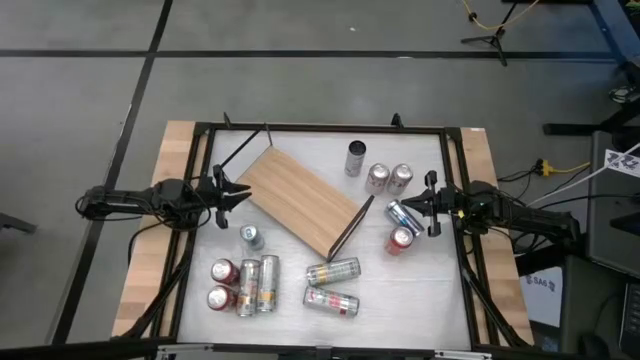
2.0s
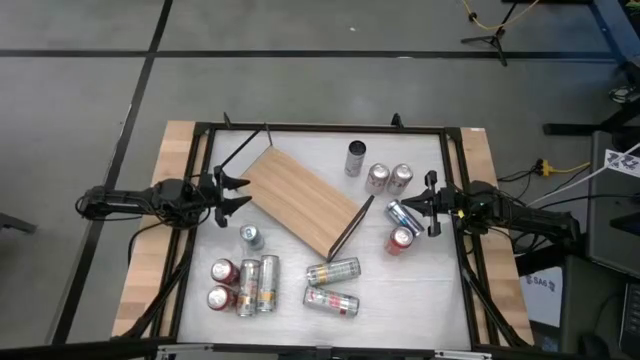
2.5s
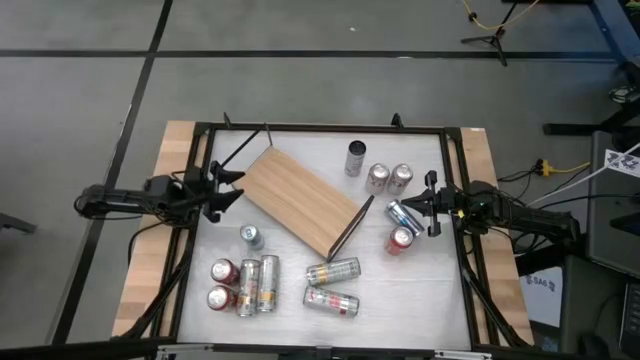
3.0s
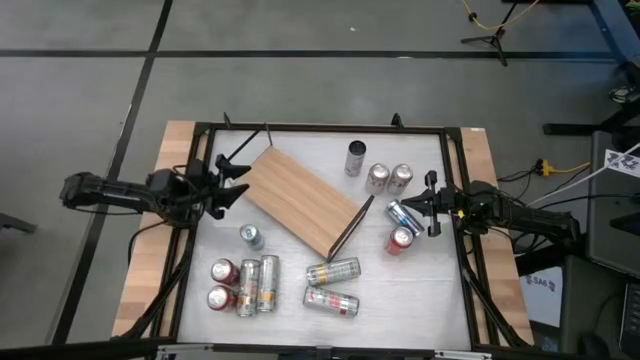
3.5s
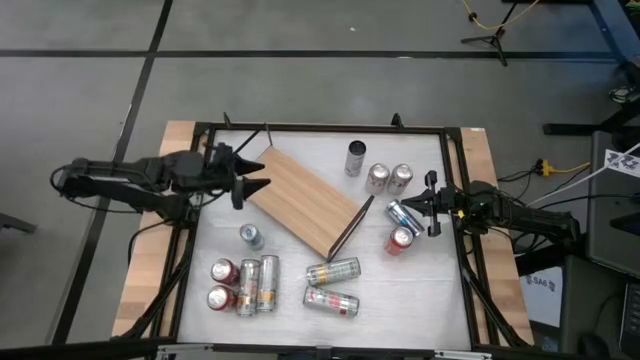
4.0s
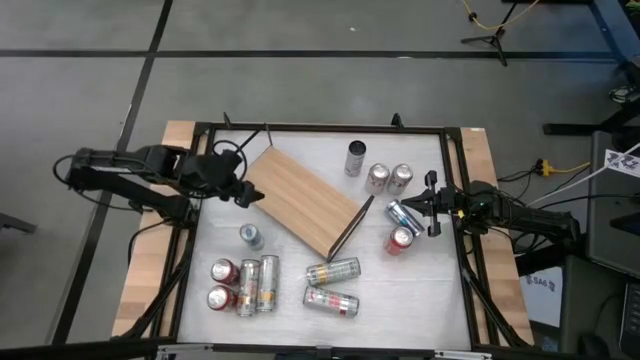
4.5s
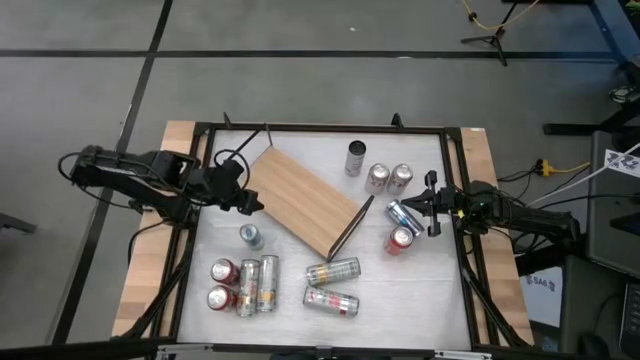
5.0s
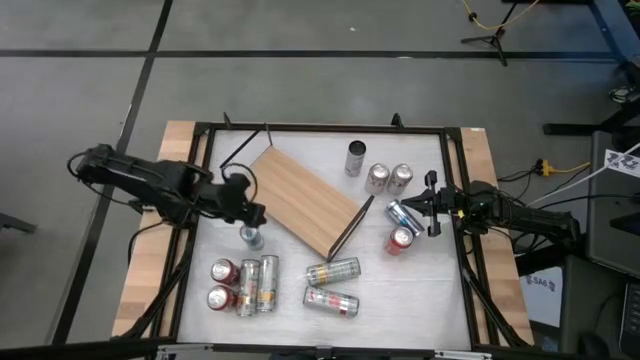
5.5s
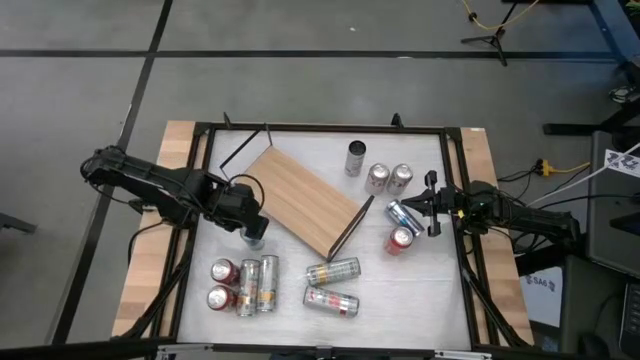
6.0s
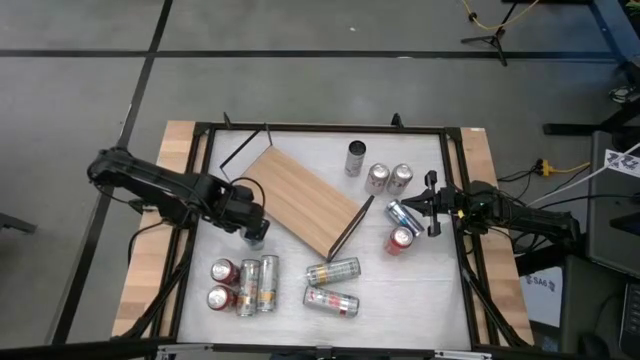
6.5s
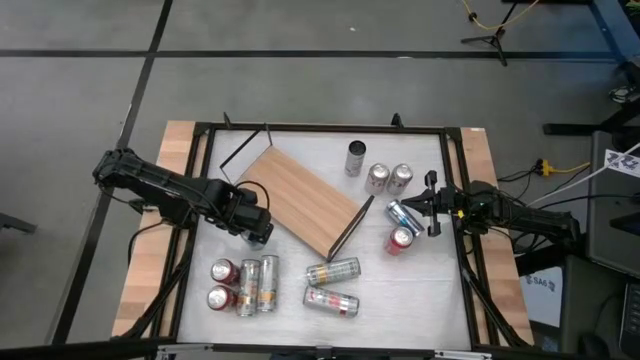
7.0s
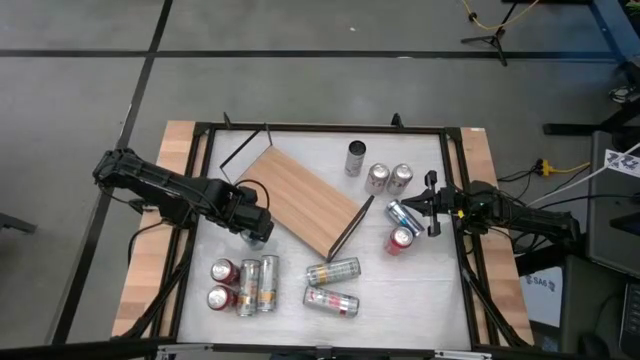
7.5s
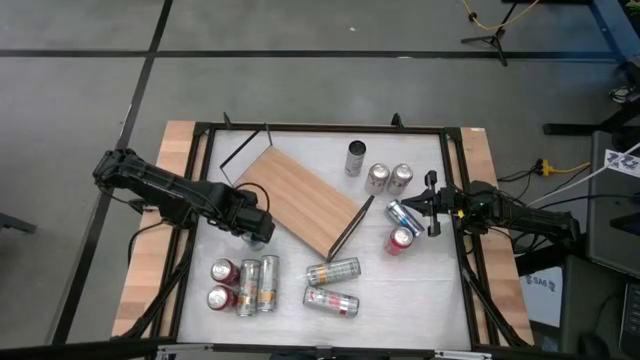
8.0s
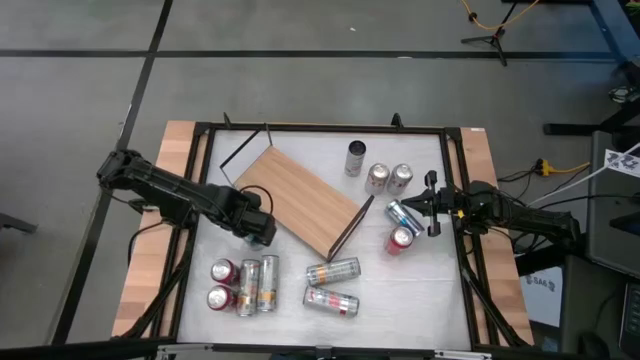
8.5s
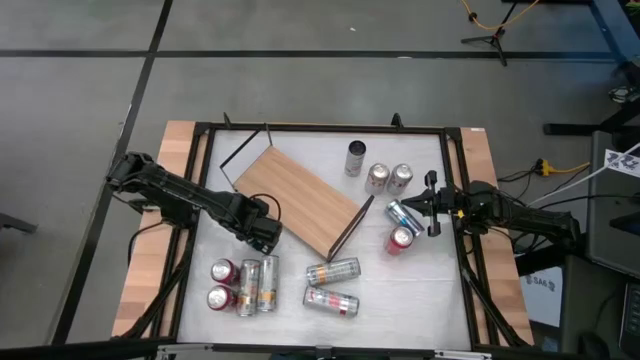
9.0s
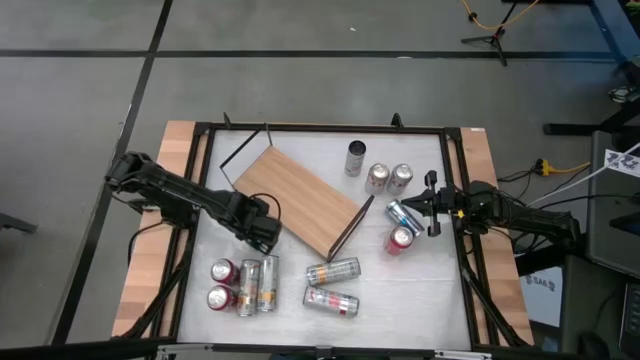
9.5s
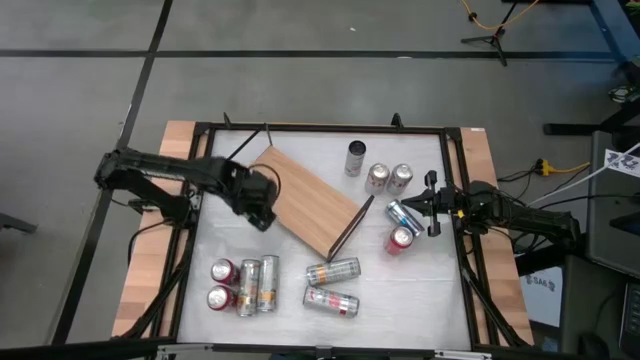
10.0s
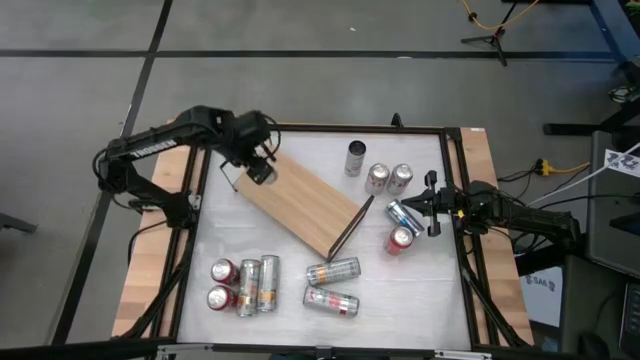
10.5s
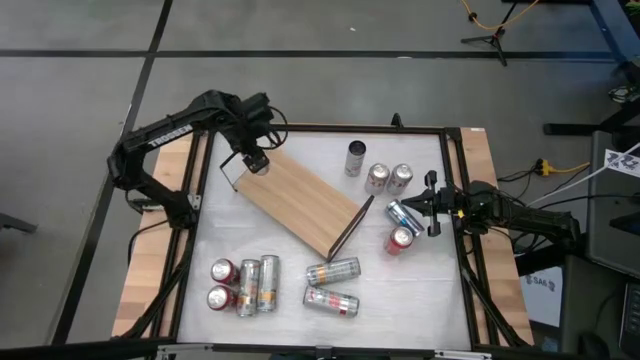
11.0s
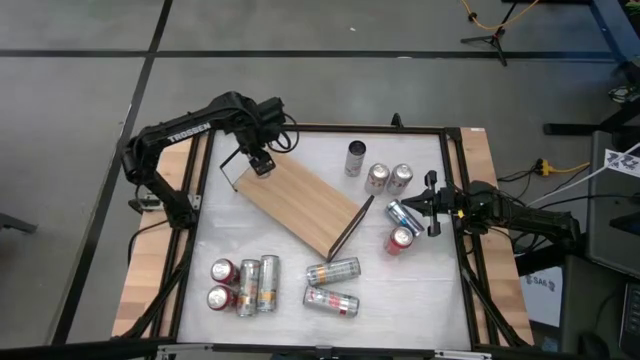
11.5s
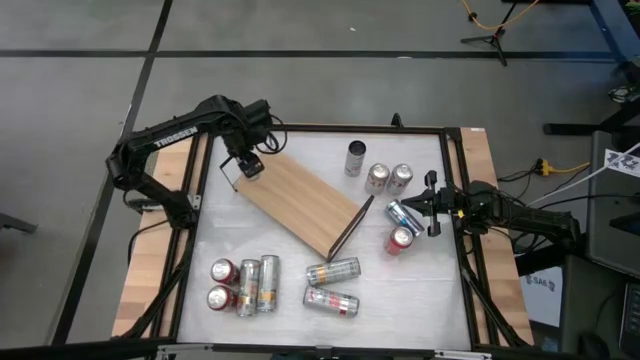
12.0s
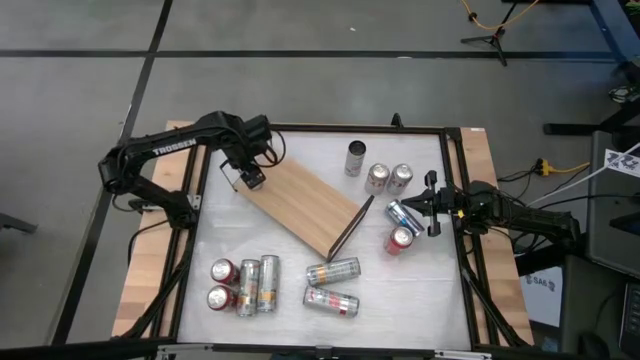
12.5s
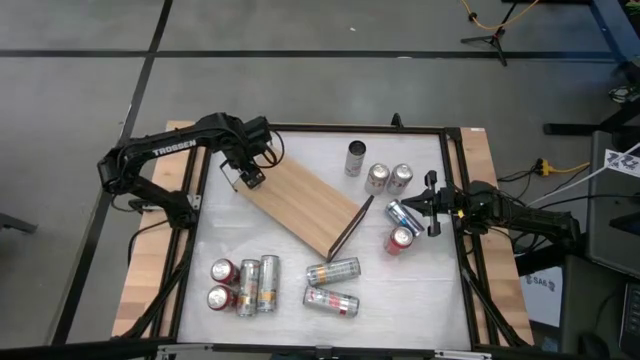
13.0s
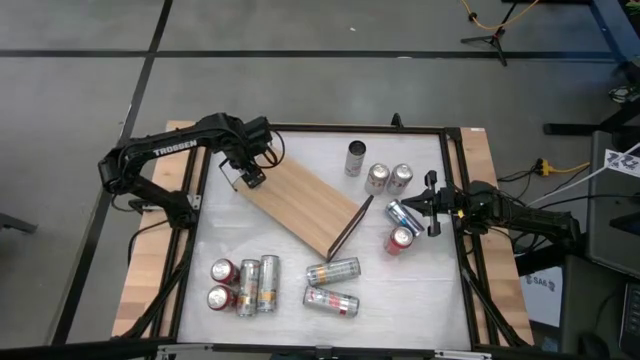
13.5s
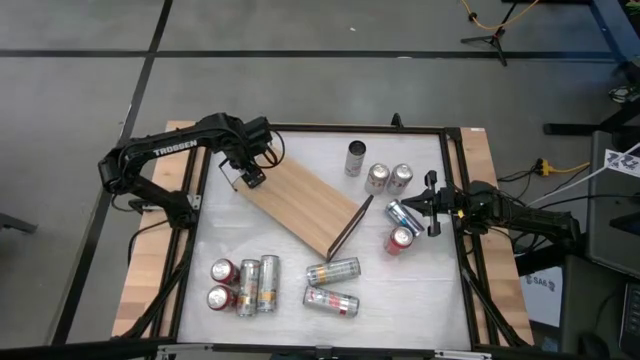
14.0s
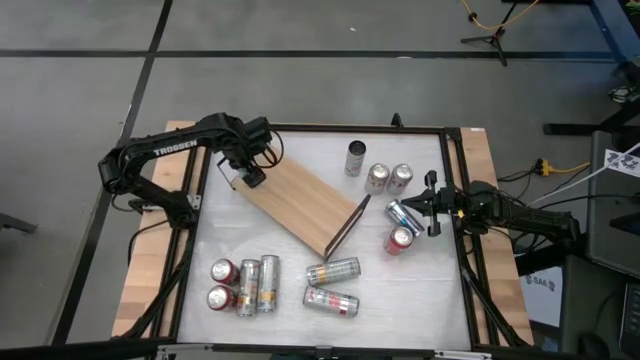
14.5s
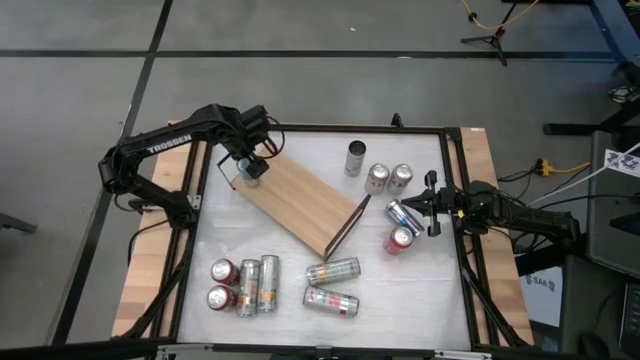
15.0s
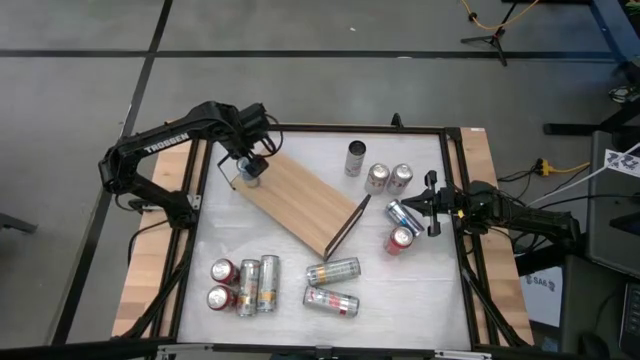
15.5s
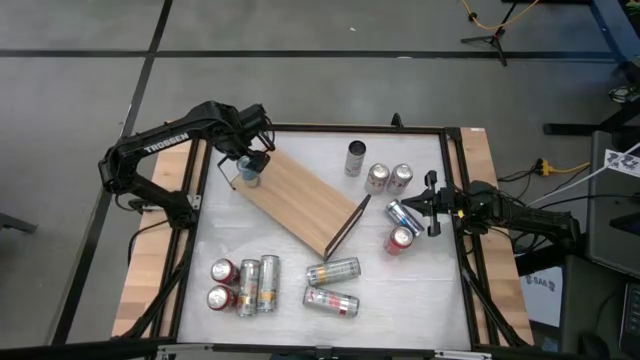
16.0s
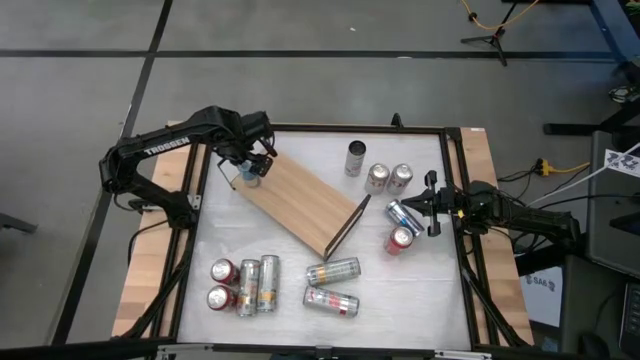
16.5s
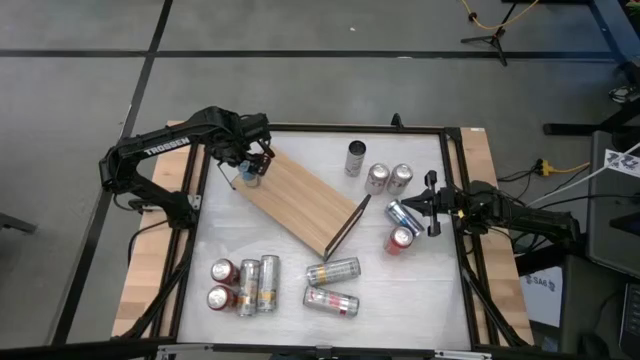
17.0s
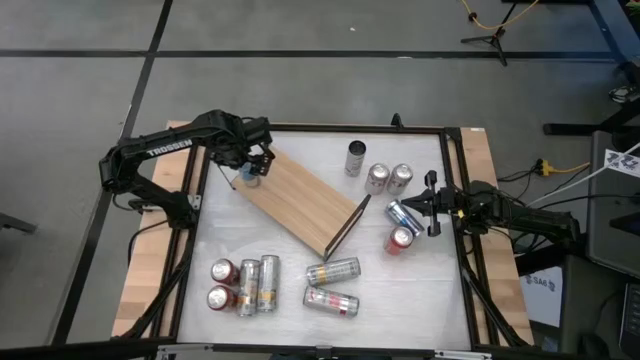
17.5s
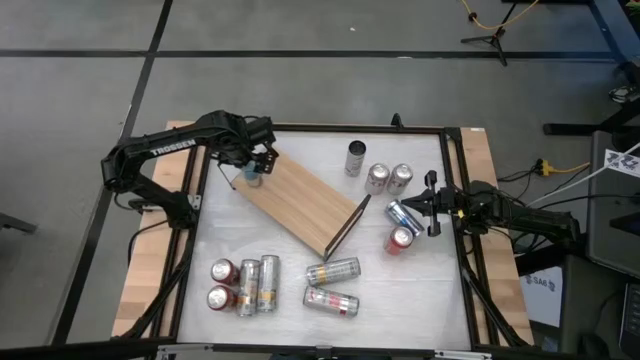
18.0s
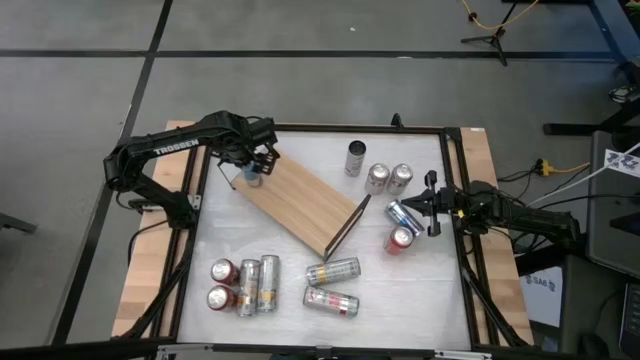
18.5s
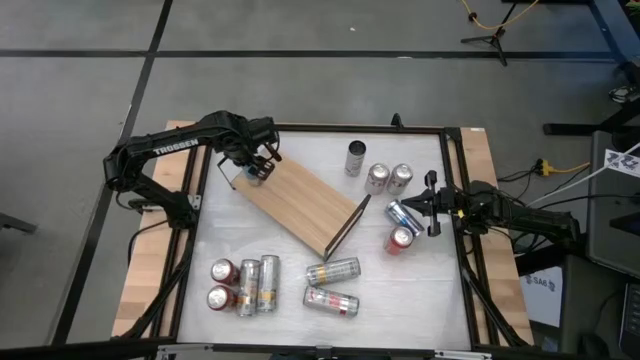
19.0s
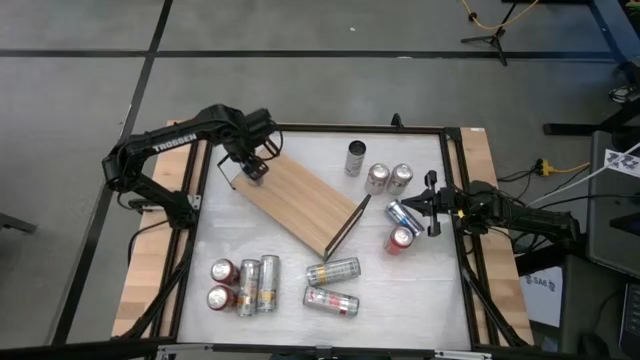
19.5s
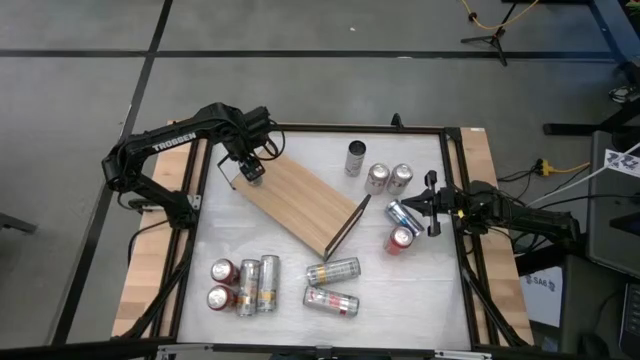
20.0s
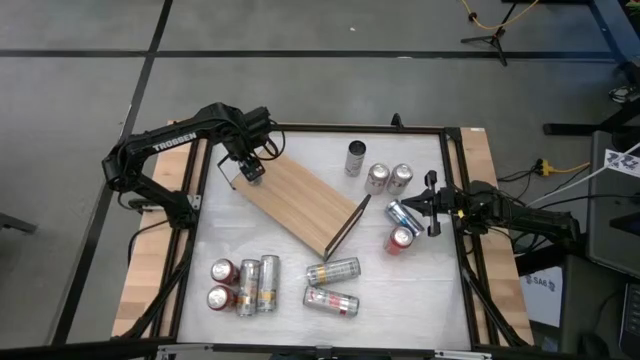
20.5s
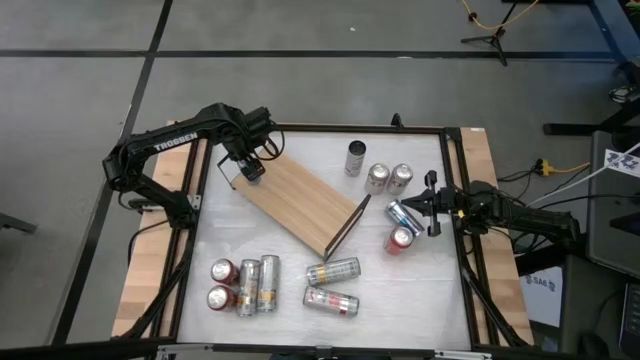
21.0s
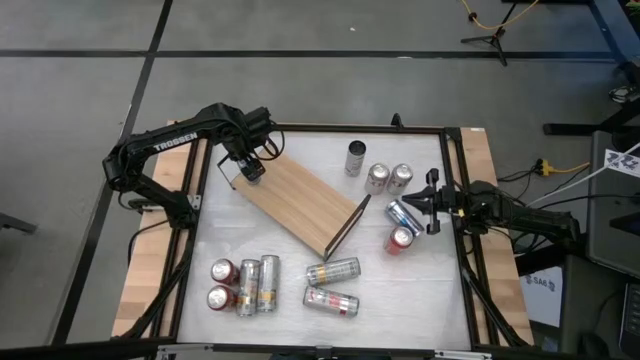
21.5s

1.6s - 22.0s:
Task: Place canned beverage on shelf
Put the left blue soda can on the shelf
